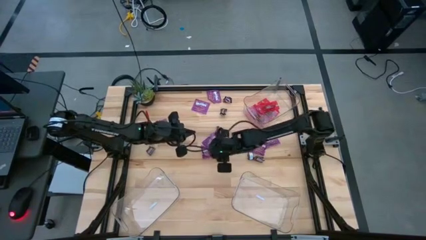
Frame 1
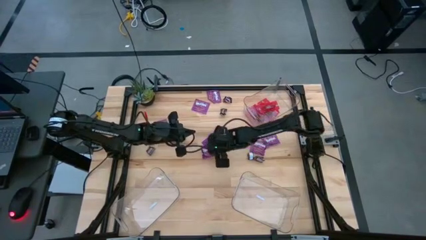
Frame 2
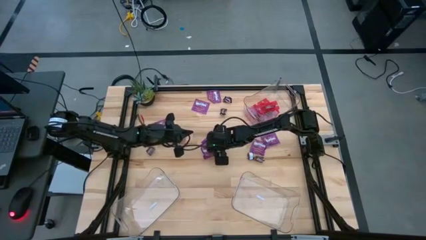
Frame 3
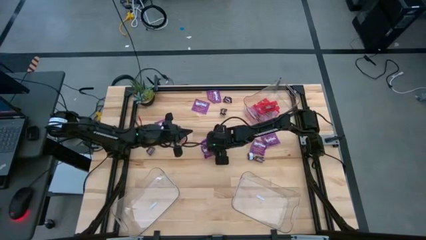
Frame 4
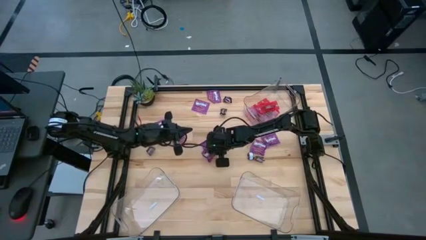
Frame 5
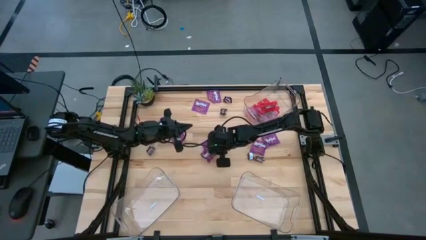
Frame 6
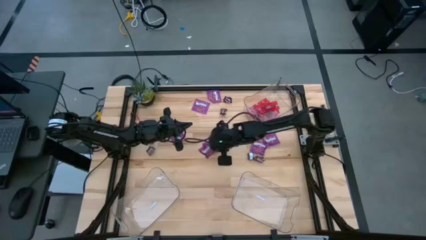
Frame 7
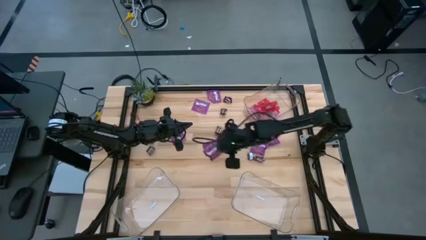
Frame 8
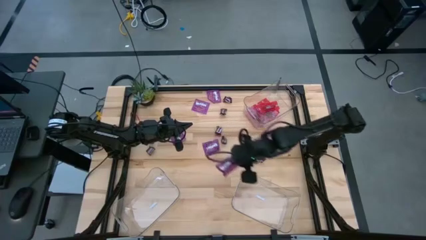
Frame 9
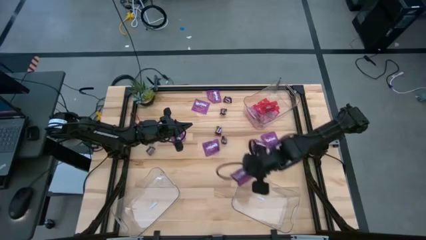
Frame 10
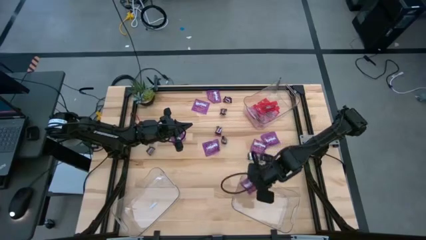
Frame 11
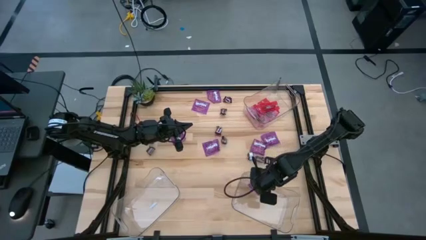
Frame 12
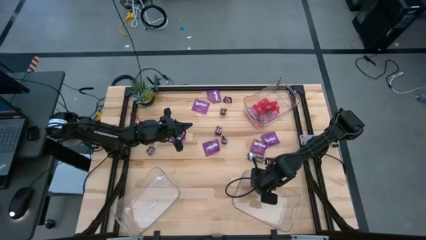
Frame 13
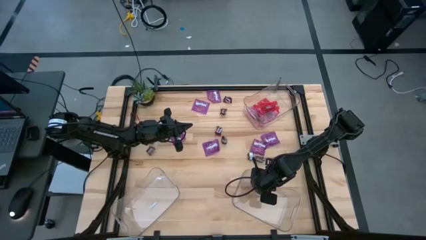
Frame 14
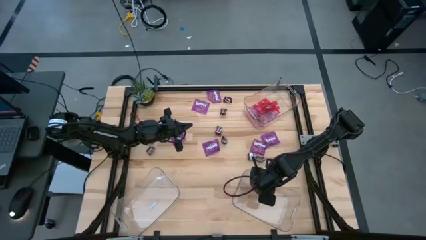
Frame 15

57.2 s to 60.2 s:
Task: Sort candy
Put the violet candy into the bottom right transparent bin

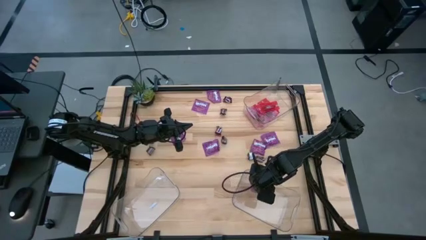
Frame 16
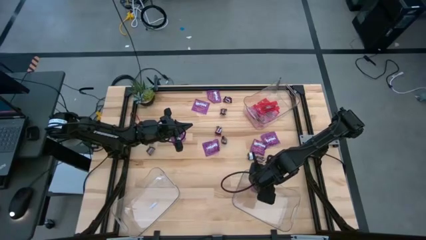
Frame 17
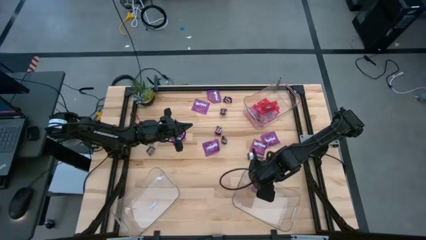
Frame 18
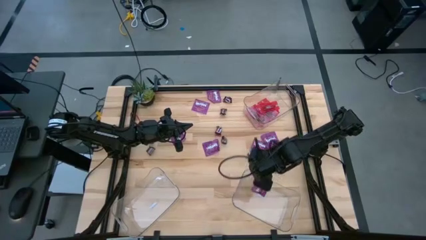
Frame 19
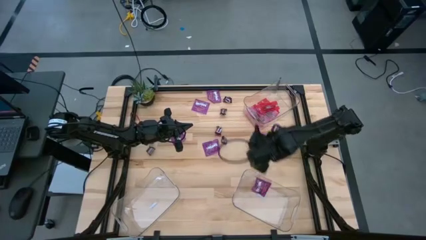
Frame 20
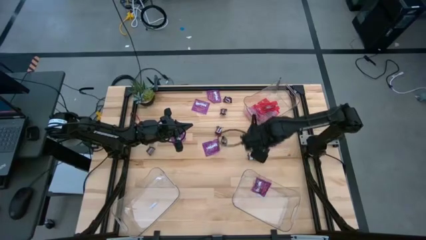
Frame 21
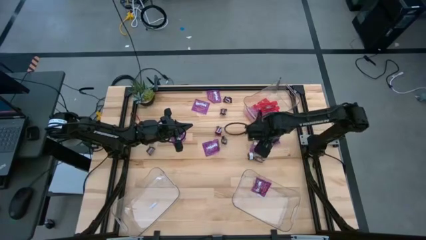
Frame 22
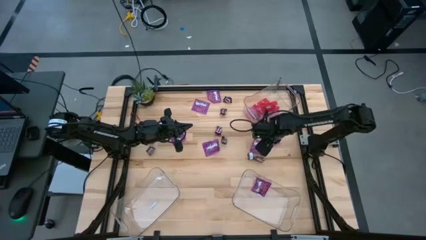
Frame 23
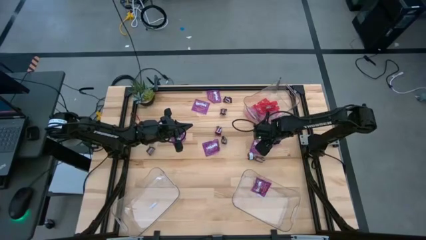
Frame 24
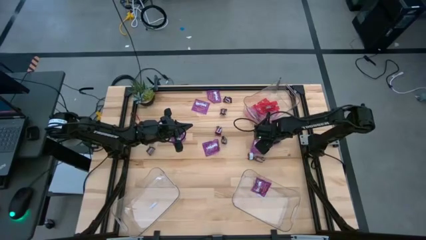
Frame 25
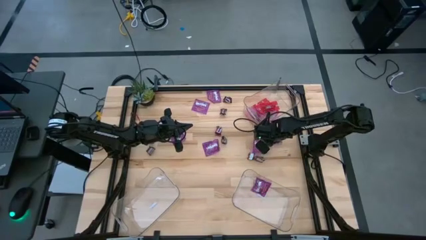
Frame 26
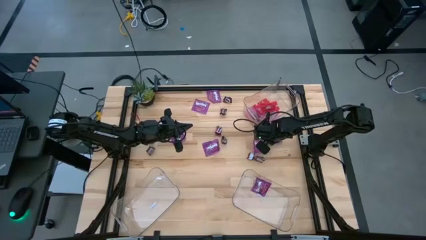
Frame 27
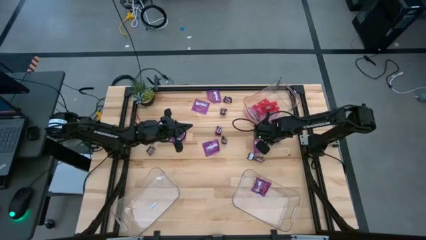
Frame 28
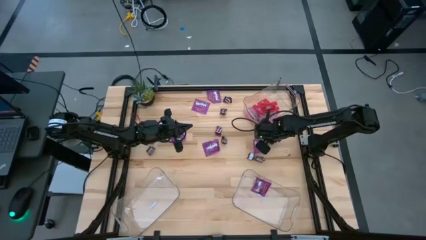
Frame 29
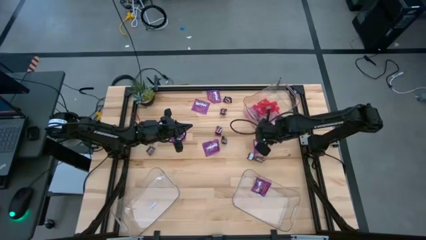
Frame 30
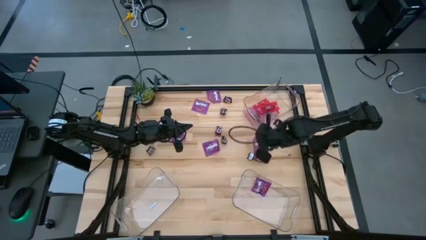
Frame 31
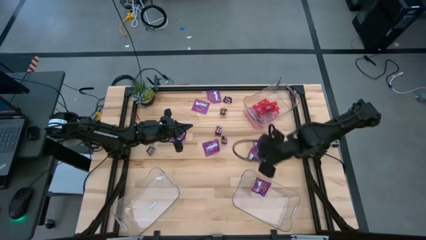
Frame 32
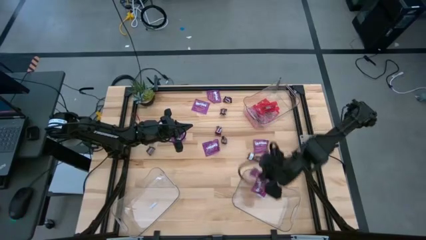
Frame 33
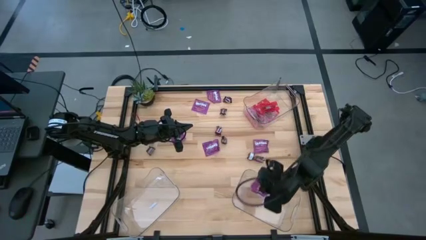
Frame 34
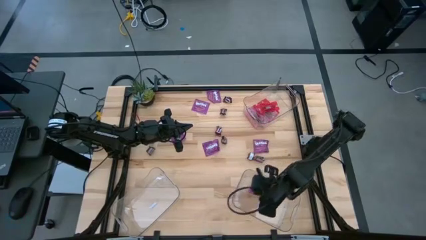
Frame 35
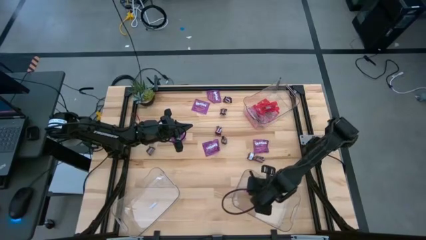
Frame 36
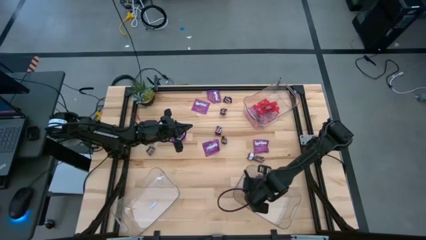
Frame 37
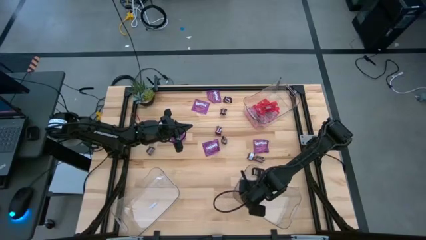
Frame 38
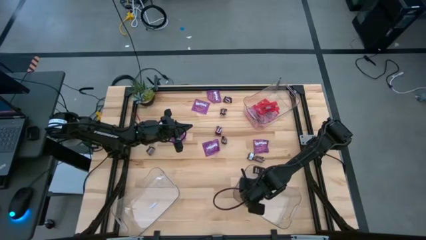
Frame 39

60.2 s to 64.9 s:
Put the violet candy into the bottom right transparent bin

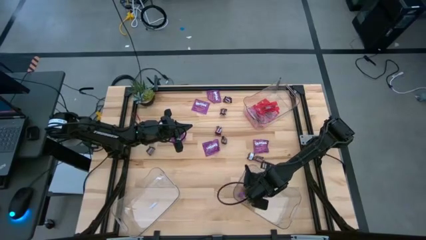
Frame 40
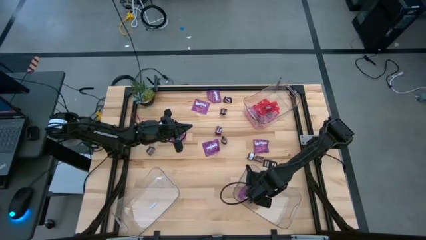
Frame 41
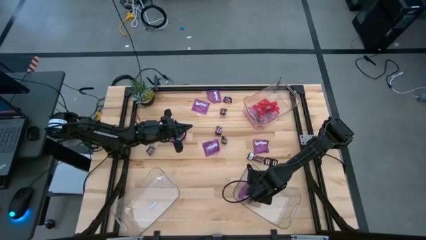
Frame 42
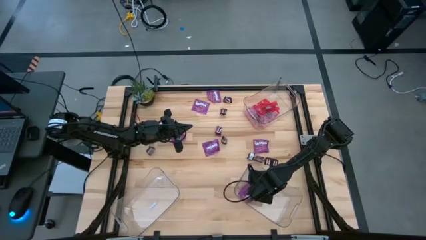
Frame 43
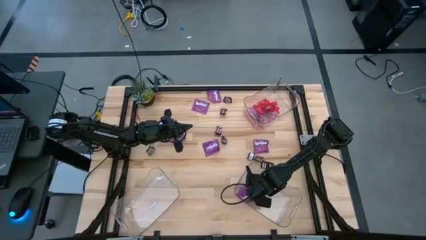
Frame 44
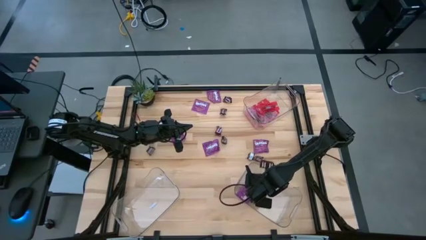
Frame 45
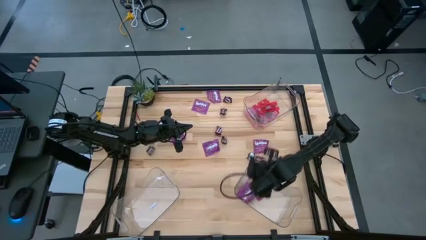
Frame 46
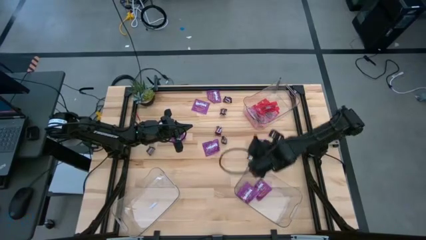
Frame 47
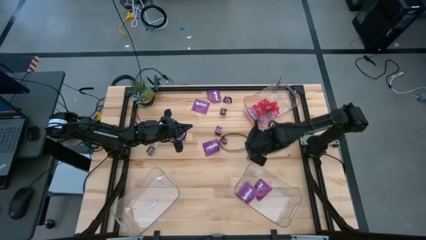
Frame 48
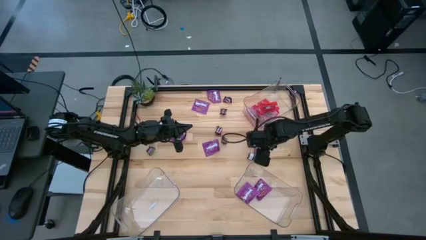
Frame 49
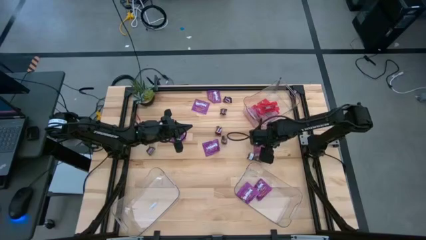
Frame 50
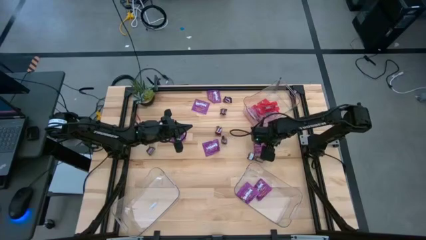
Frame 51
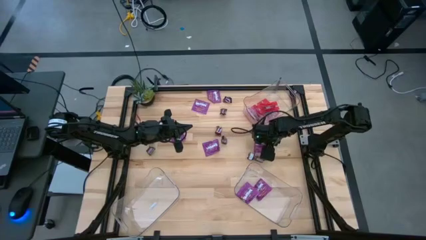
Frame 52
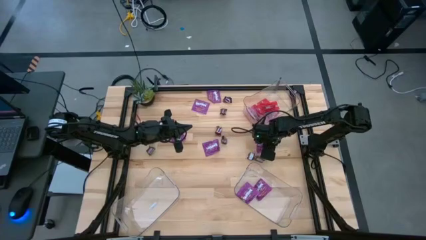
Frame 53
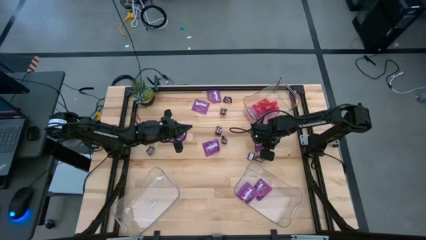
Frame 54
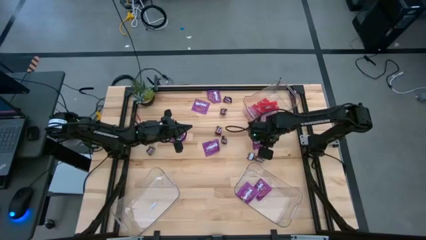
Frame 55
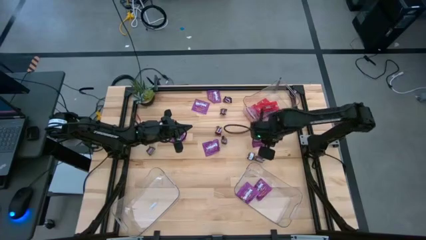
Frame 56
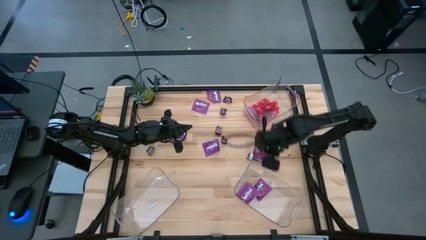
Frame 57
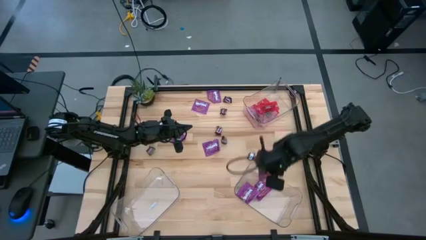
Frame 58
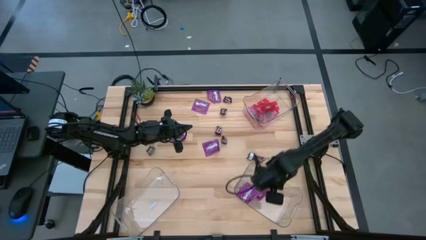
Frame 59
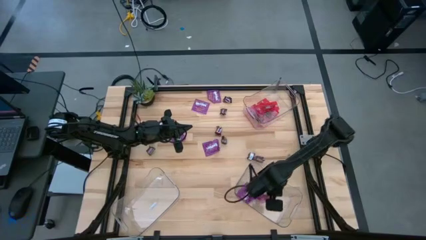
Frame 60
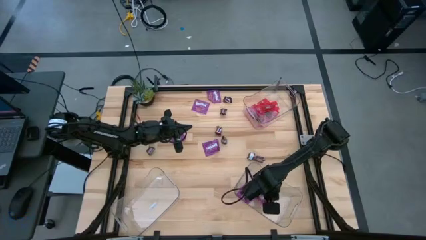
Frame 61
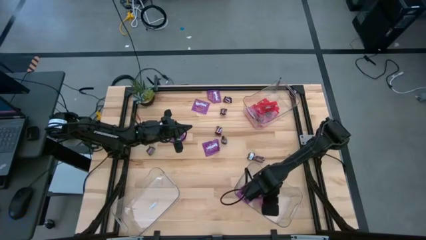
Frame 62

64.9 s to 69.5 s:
Put the violet candy into the bottom right transparent bin

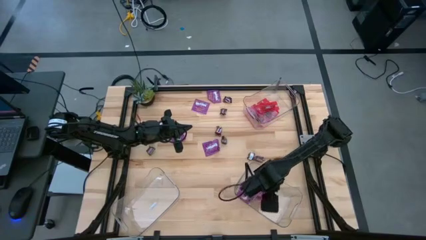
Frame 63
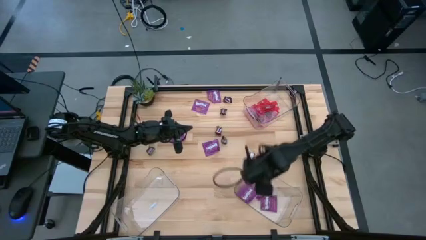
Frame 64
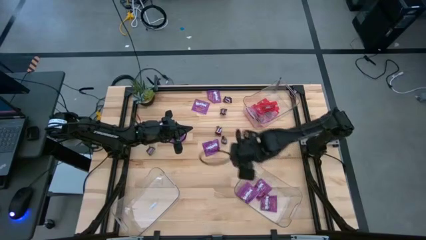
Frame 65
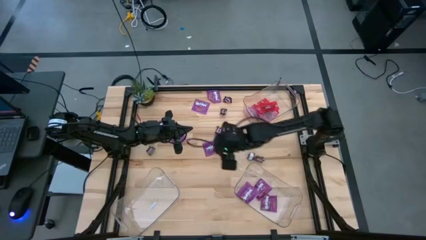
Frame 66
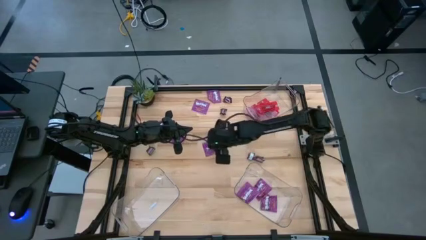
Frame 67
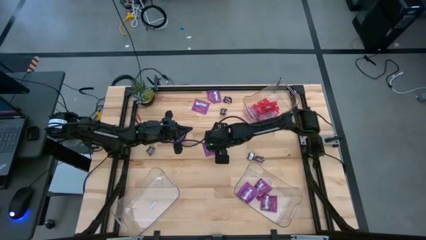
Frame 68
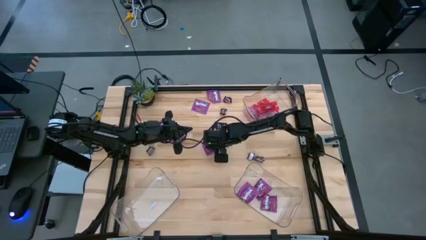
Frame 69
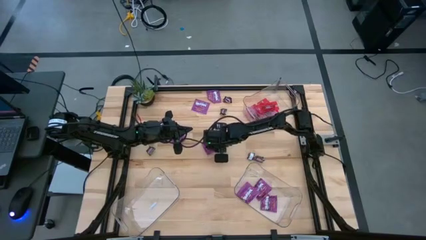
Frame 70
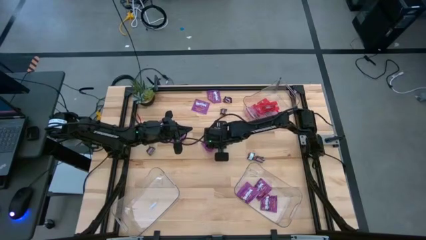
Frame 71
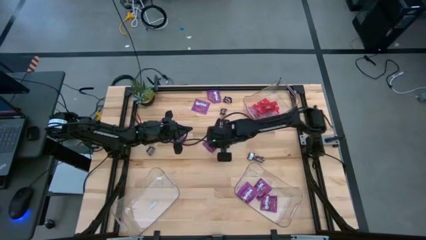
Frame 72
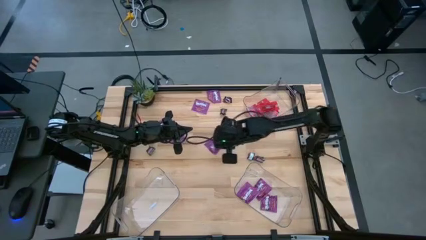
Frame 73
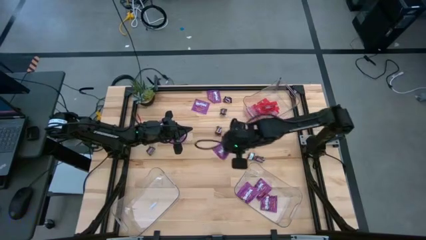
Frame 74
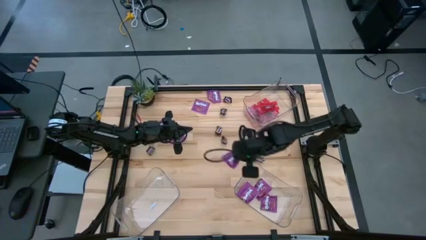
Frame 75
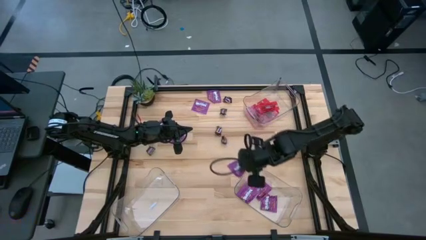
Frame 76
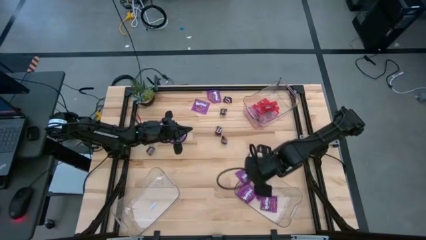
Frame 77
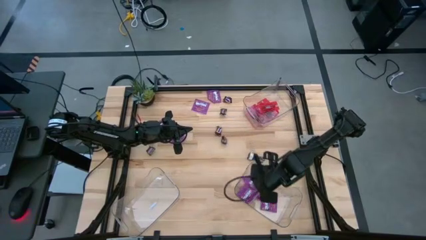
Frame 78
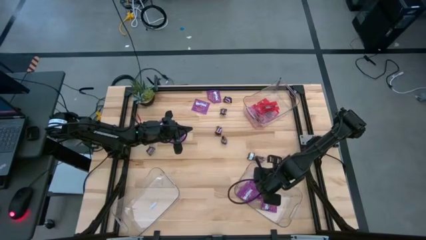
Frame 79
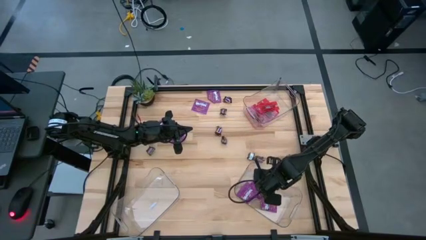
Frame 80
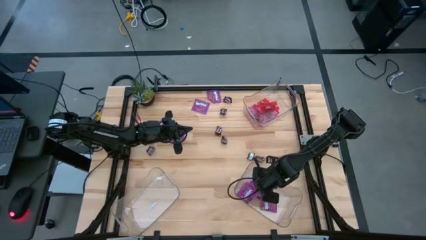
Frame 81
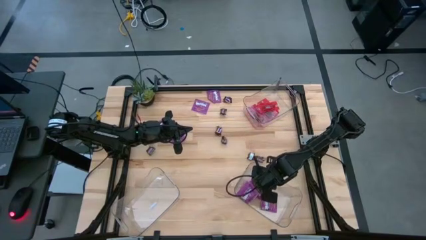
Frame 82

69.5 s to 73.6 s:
Put the violet candy into the bottom right transparent bin
